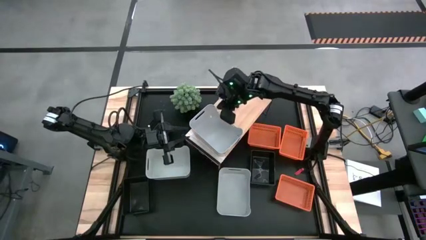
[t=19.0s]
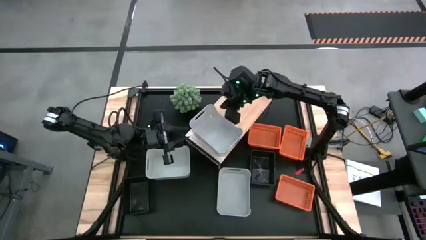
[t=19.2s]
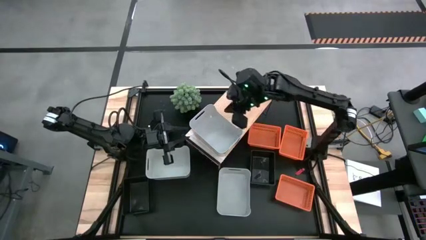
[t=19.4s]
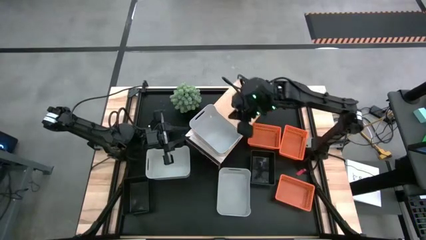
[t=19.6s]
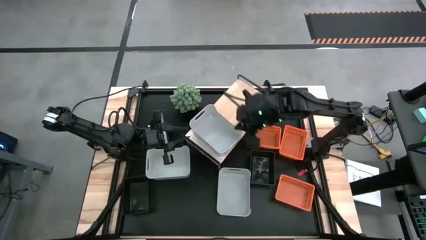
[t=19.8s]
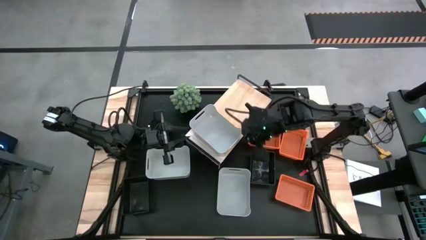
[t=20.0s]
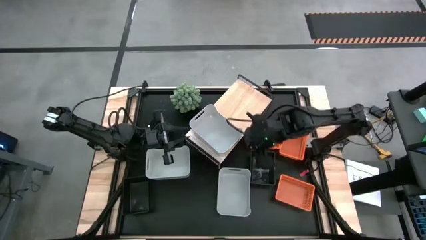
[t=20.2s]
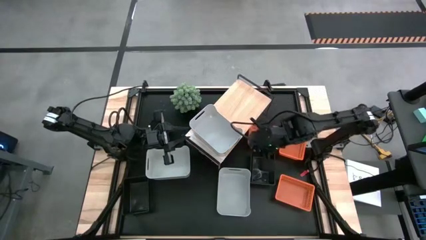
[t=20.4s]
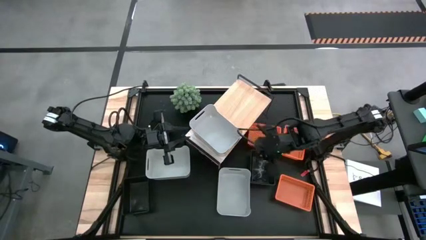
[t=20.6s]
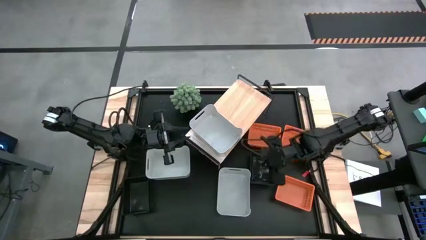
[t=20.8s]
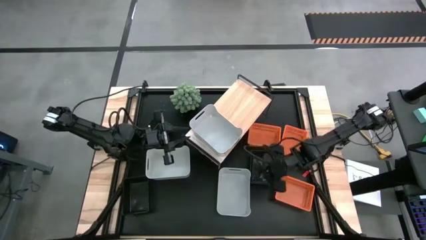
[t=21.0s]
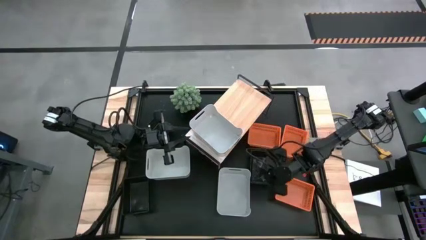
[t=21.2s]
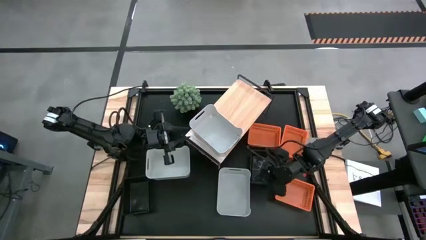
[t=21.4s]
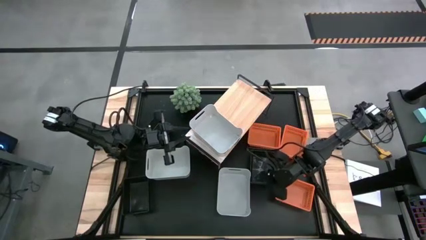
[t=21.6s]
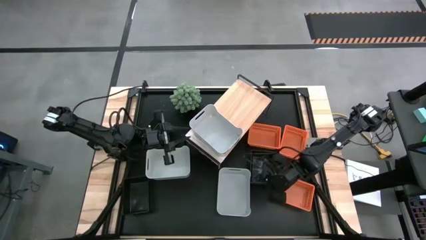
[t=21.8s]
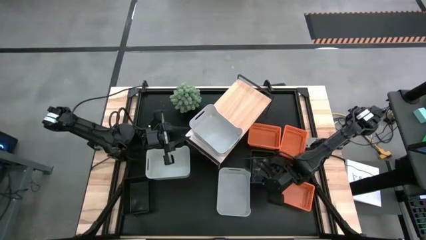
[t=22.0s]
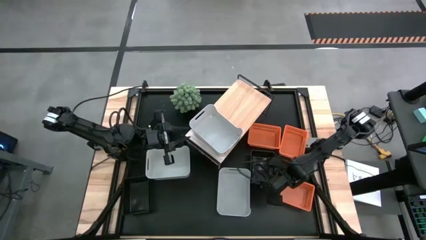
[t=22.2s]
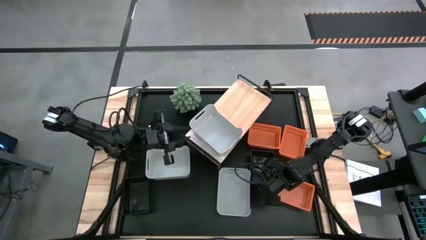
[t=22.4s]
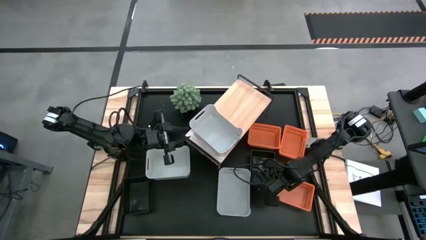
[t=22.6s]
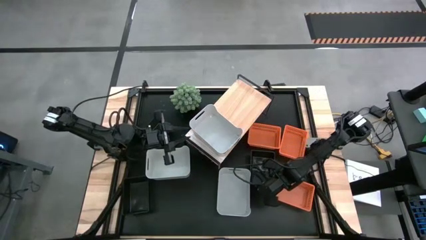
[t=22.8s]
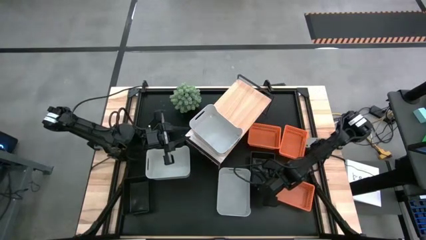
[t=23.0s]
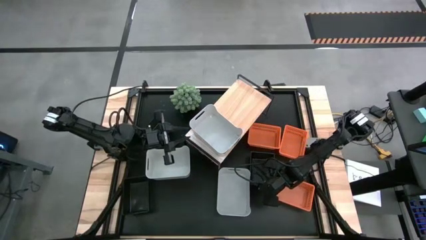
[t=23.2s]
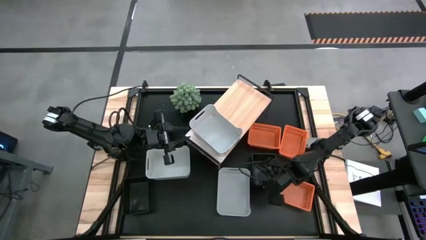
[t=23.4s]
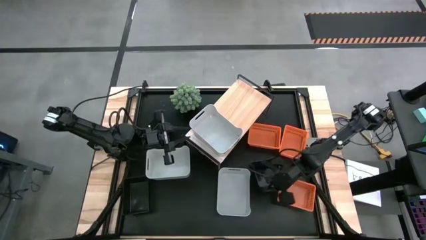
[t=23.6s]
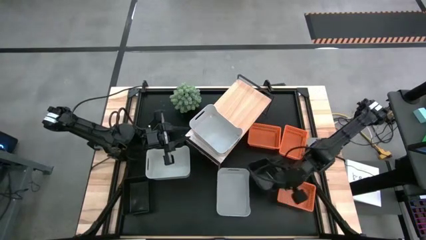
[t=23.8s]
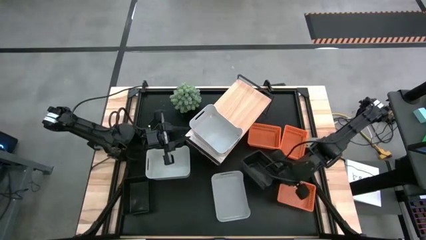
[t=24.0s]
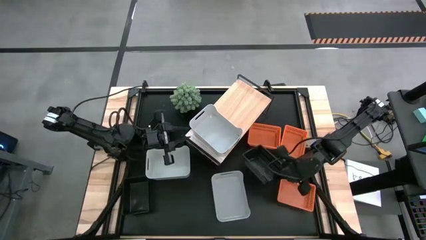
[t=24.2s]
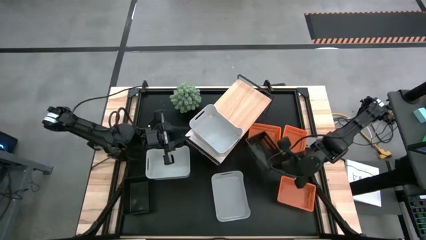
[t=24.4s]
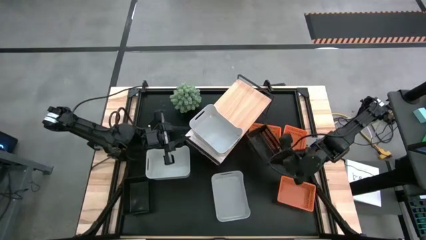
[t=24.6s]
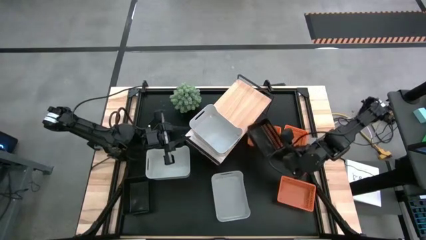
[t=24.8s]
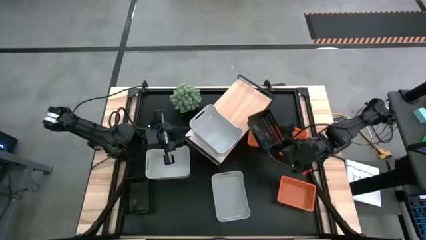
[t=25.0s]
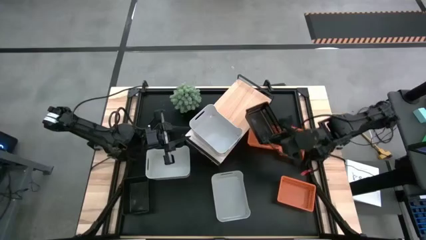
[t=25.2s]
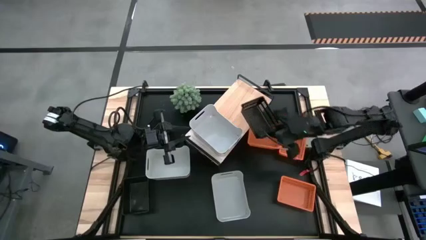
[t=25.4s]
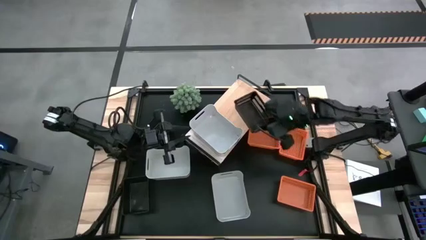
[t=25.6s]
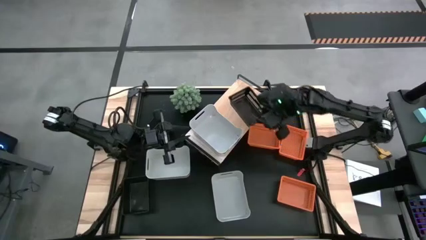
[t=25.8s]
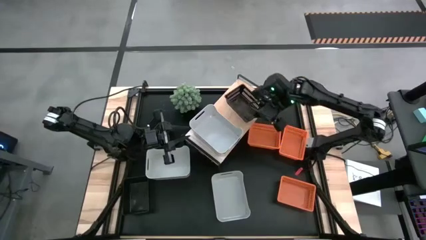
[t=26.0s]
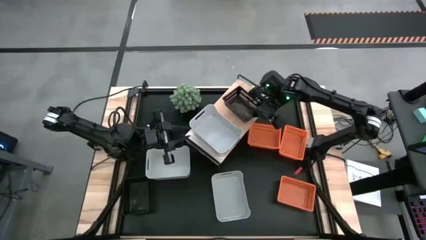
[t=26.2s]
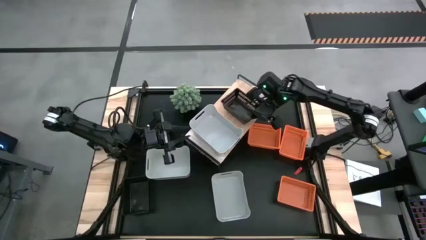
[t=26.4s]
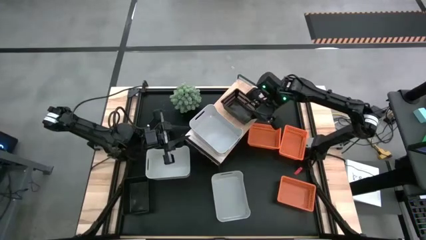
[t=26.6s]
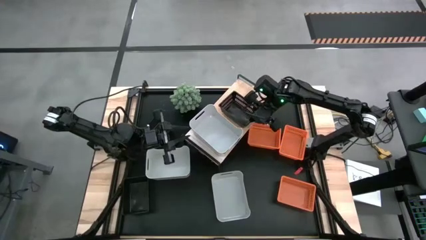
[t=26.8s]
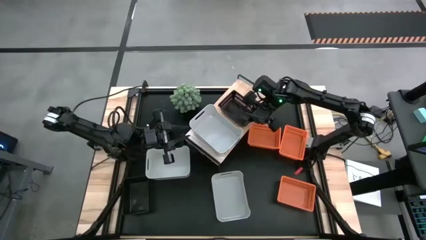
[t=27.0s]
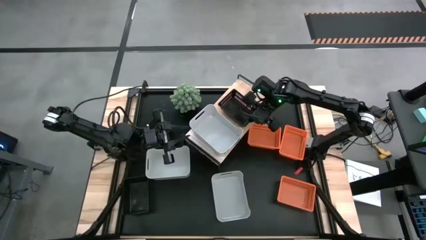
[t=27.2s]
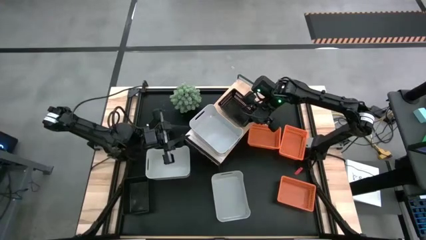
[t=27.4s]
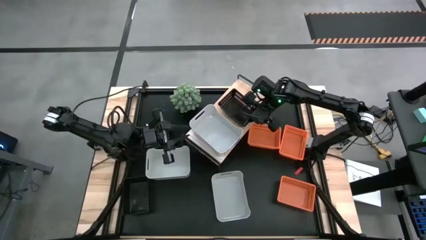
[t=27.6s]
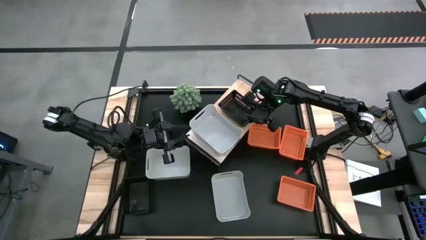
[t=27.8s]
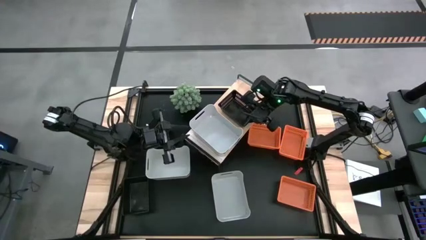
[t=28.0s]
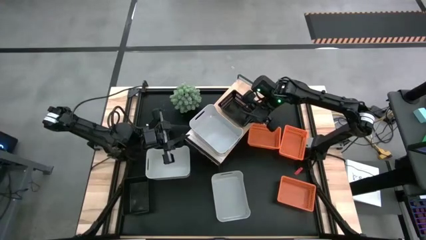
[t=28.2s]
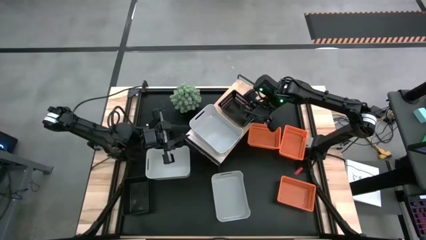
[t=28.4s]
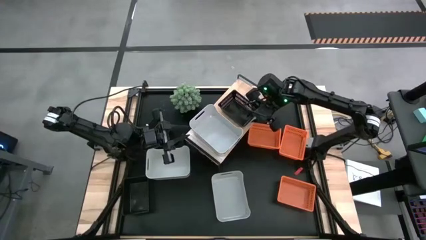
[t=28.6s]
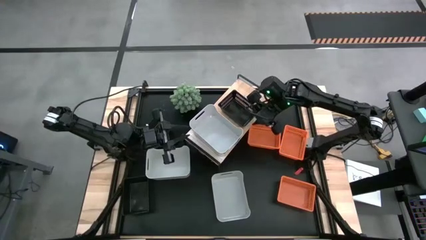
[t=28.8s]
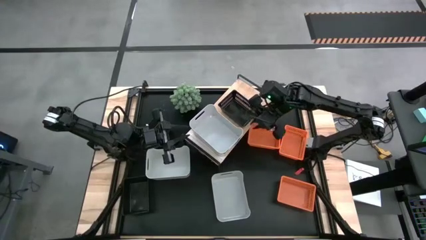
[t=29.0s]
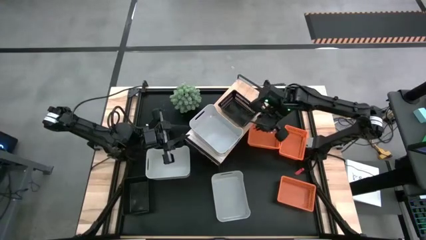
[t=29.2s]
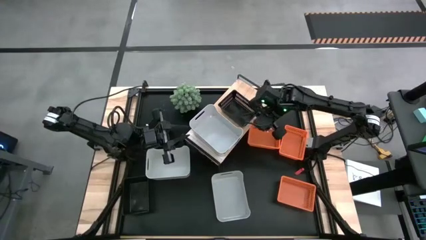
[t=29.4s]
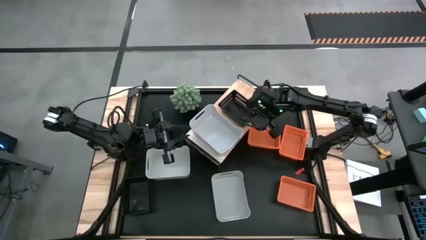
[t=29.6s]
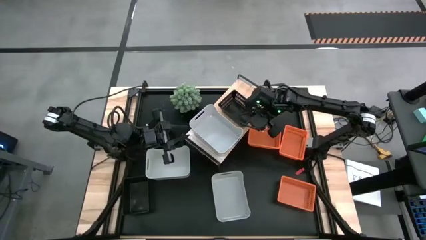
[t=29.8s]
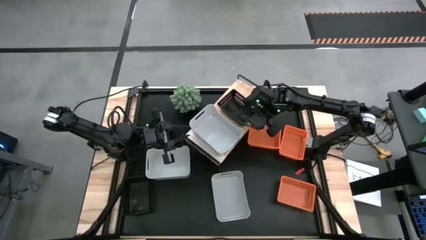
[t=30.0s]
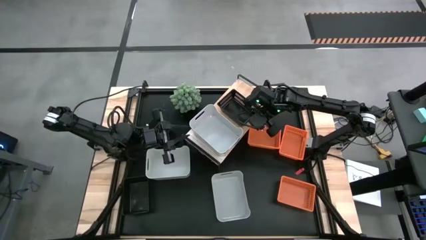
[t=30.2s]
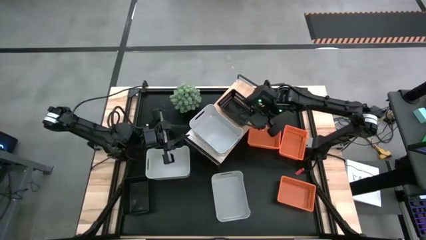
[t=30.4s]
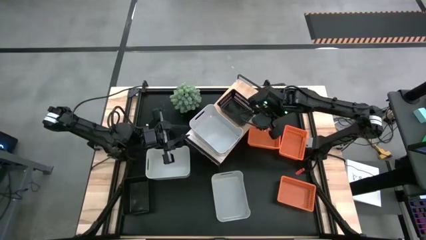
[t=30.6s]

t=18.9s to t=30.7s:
Task: Stack baskets on shelf by color
Put the right black bin on the shelf
